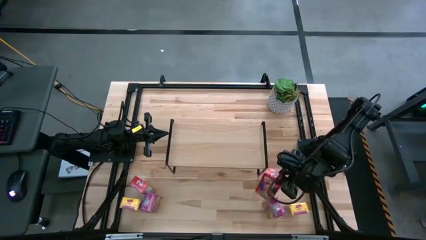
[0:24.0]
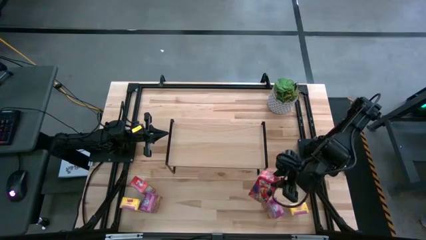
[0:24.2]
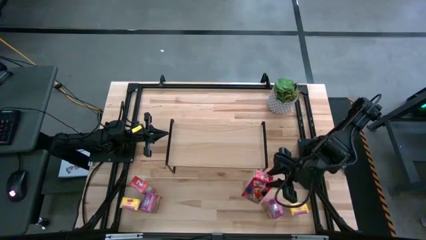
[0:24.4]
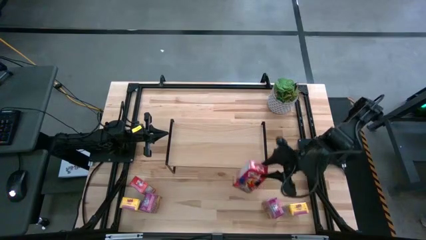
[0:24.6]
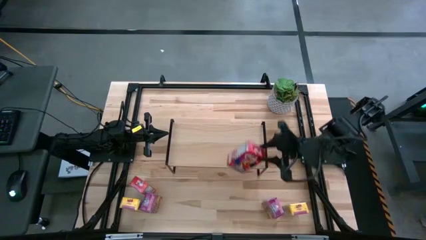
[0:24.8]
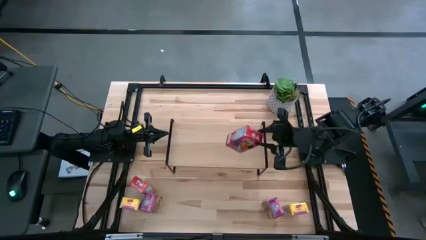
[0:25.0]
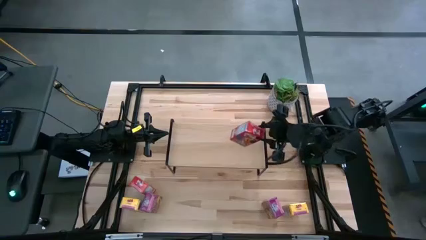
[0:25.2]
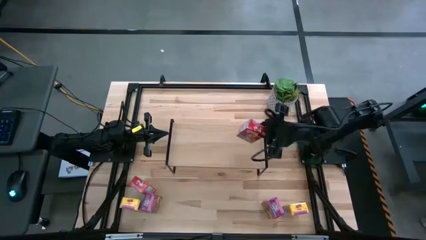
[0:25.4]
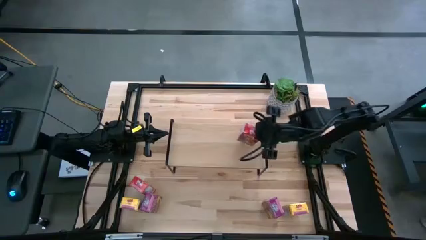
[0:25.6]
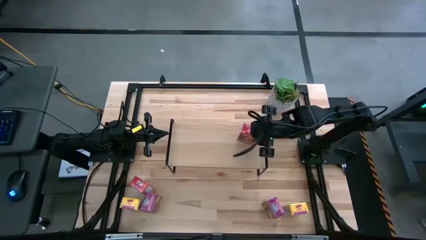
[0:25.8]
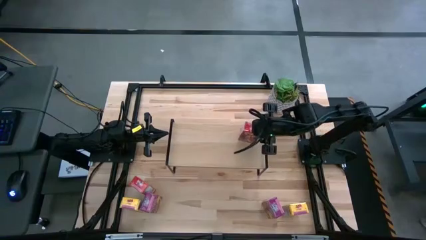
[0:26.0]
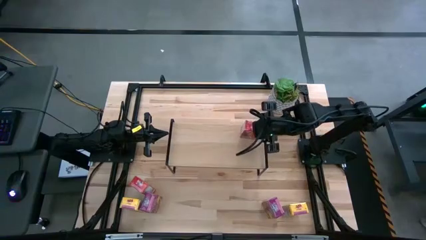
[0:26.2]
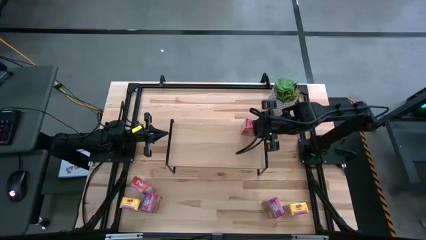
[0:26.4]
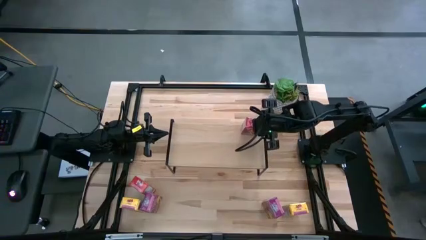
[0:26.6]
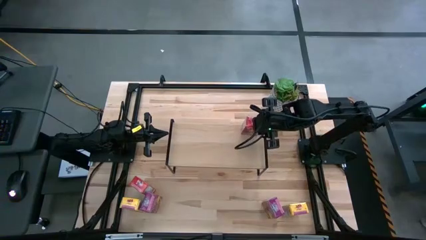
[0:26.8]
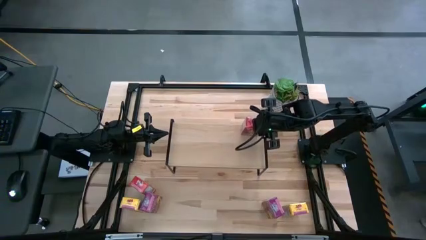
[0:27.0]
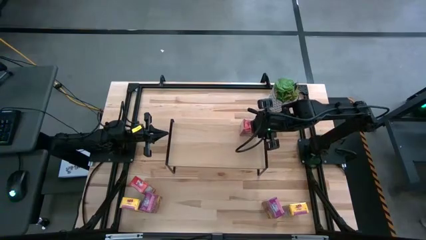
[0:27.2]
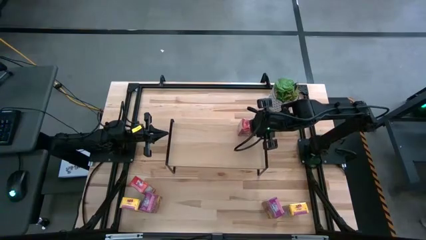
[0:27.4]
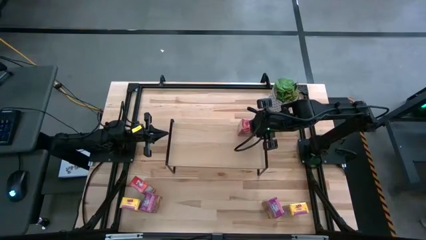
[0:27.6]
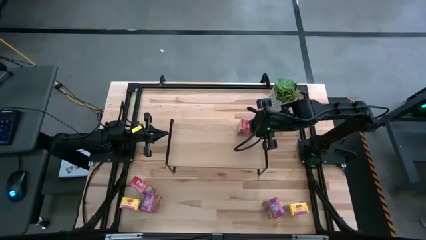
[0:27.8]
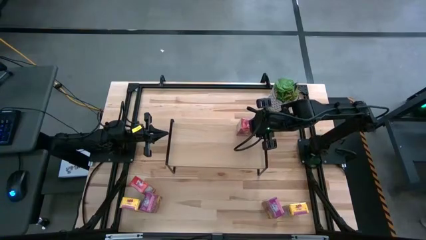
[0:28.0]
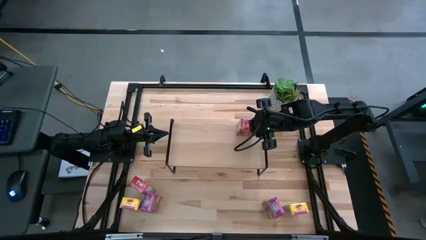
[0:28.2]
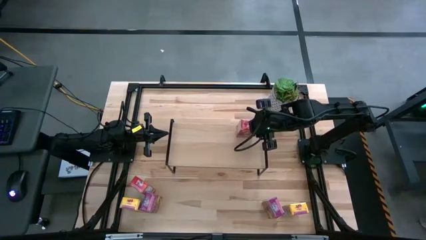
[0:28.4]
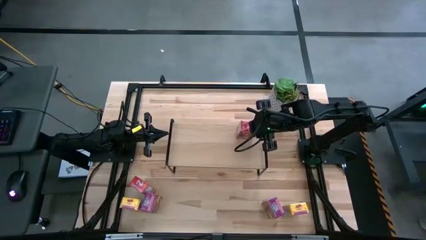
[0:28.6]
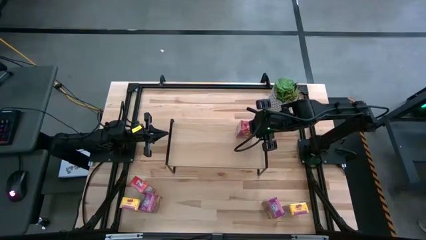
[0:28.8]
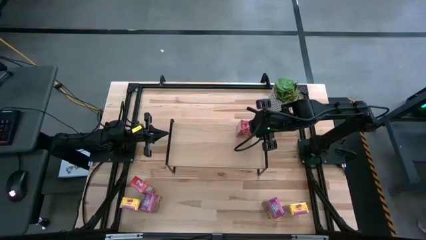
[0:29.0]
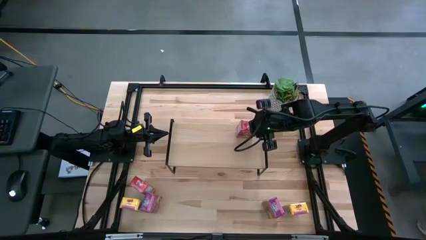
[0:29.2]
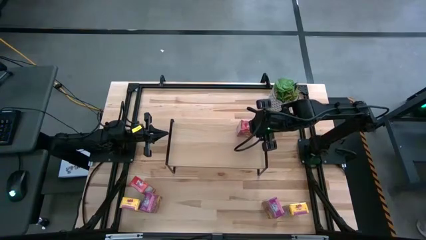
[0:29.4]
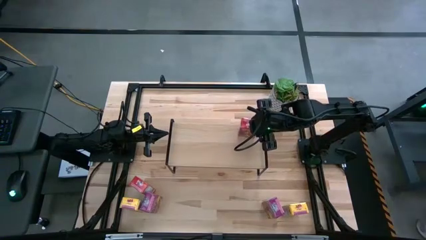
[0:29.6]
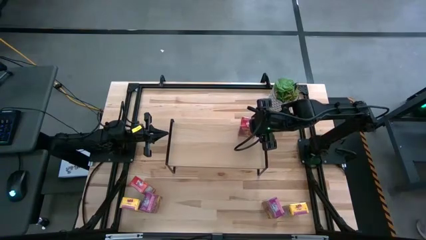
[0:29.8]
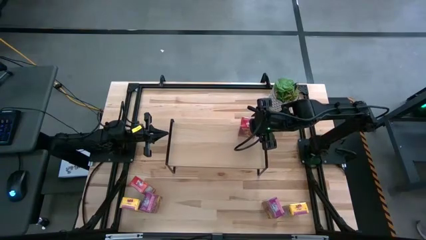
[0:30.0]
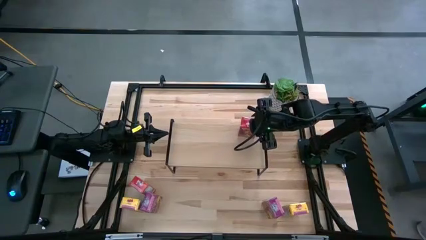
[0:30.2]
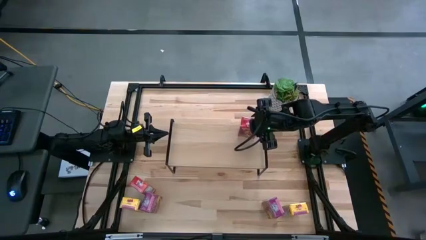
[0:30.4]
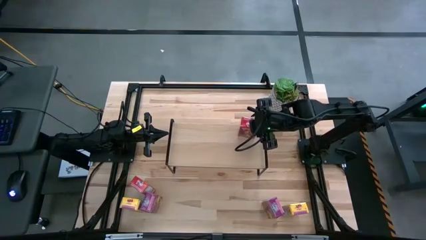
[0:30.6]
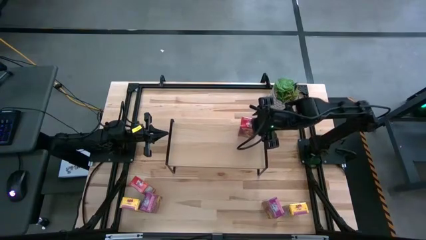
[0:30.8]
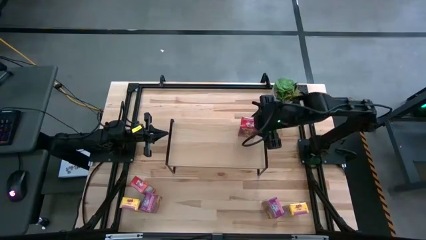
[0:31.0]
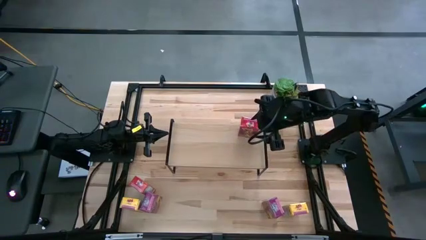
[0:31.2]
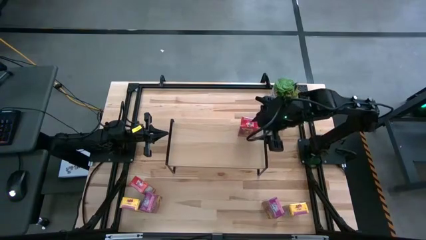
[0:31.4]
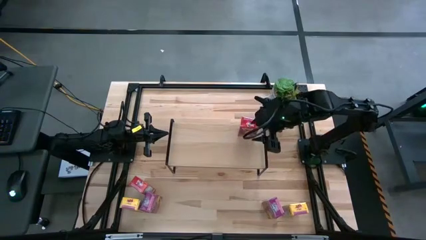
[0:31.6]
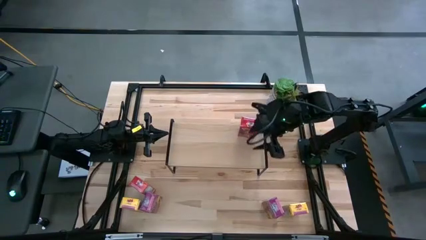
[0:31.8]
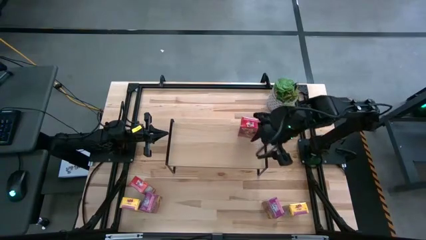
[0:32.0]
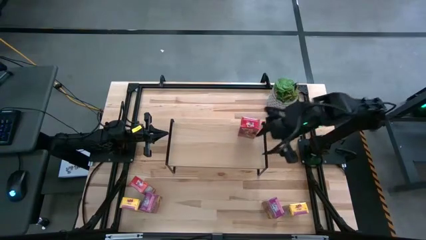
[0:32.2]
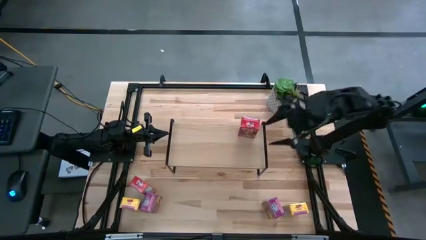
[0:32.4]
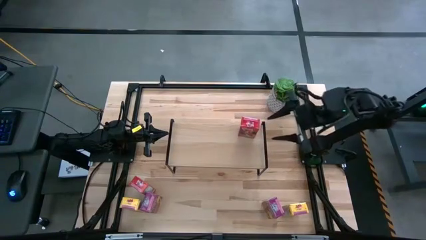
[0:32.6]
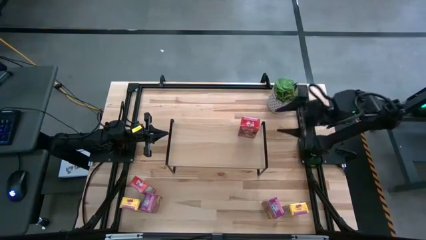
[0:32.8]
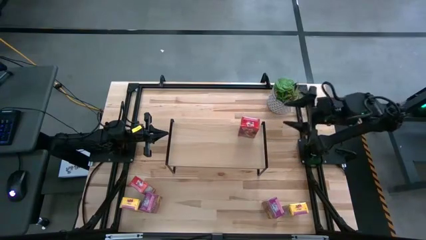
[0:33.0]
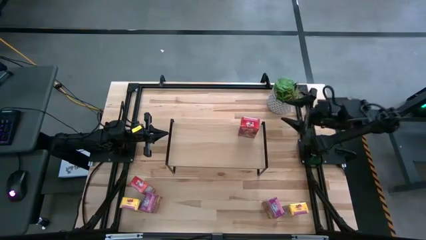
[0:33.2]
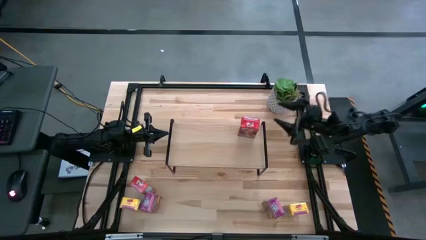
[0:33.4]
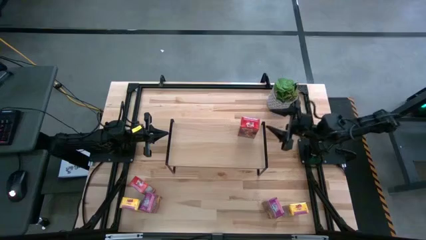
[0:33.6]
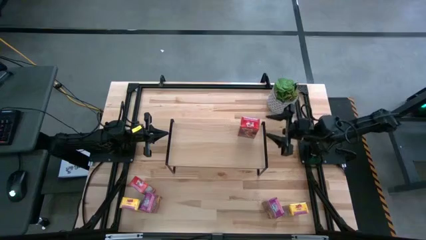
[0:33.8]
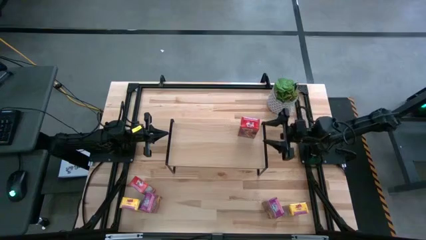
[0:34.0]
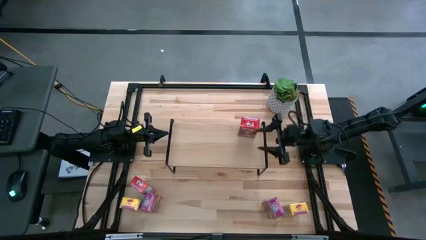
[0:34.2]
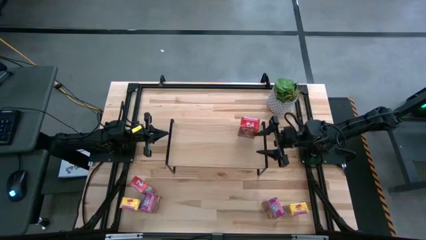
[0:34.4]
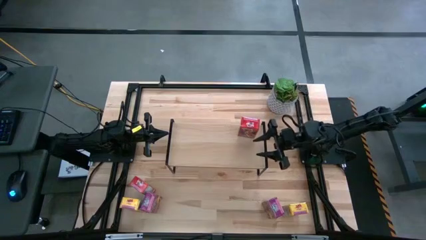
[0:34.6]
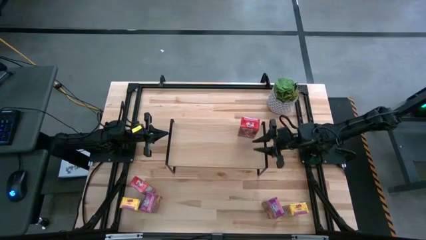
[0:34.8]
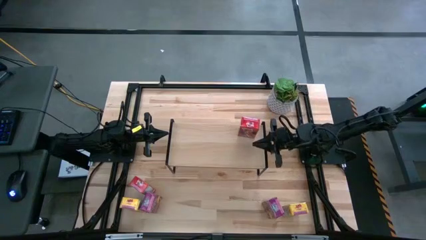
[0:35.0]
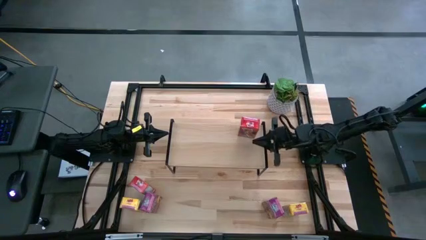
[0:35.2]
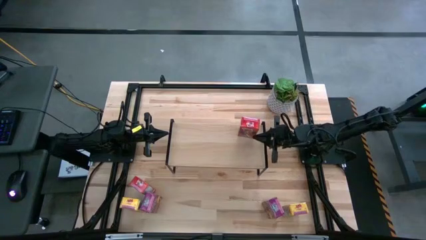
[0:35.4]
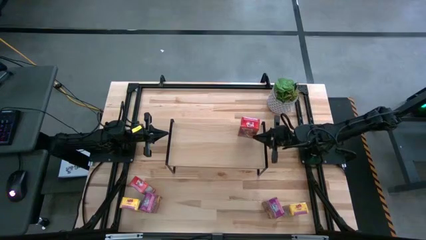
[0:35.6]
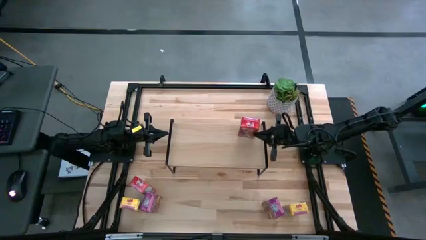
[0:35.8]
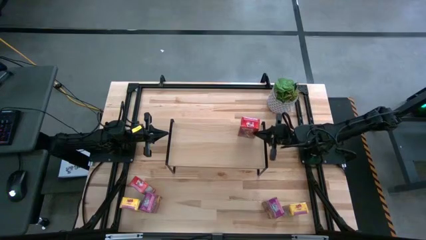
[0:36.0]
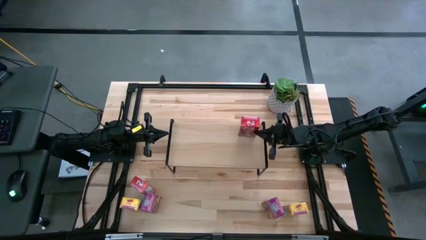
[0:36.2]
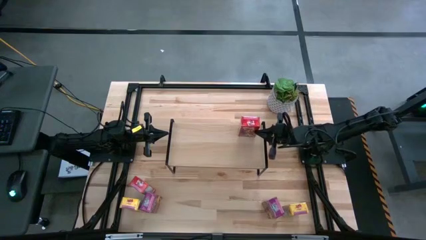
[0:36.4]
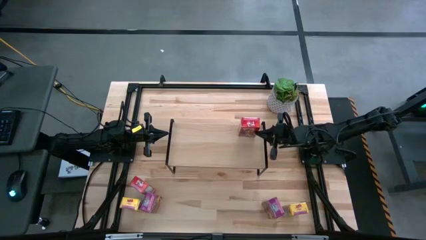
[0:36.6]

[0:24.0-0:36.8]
Task: Stack cereal on shelf
Put the right red cereal box on the shelf
